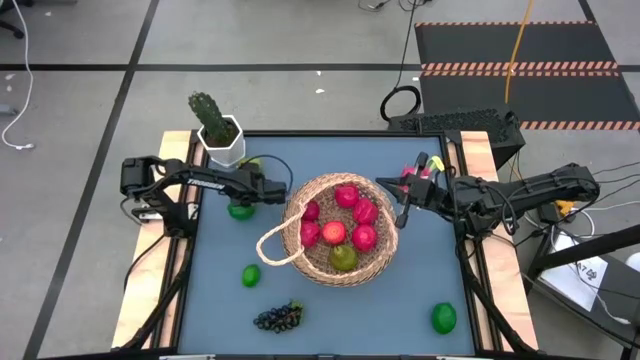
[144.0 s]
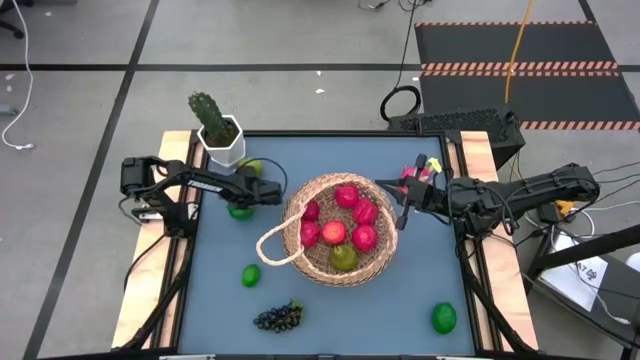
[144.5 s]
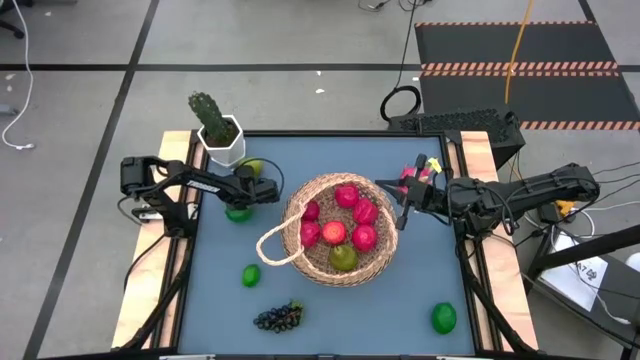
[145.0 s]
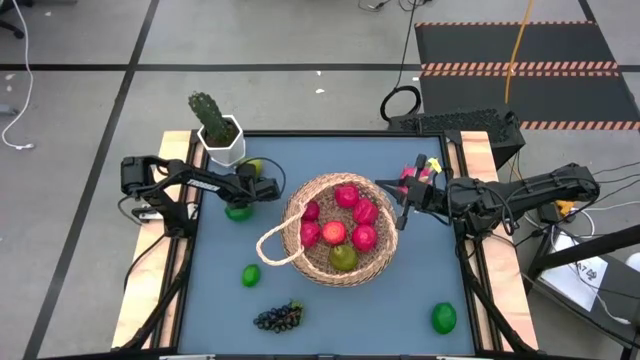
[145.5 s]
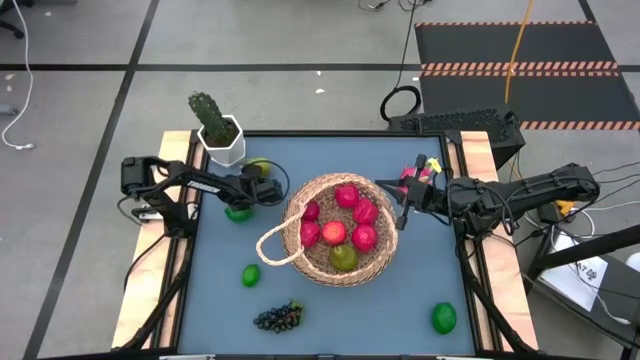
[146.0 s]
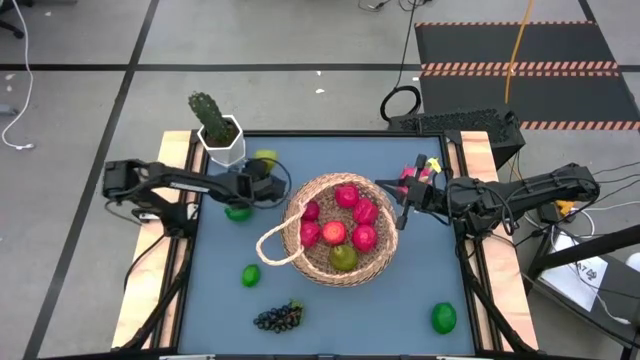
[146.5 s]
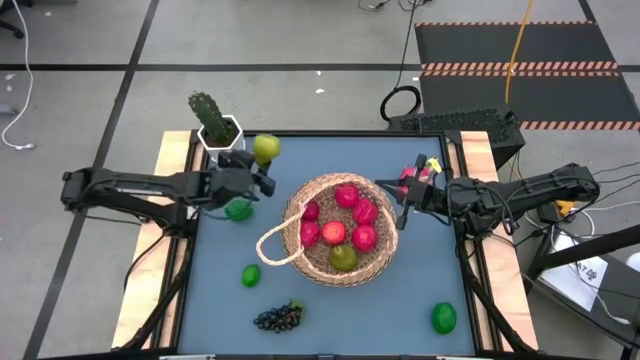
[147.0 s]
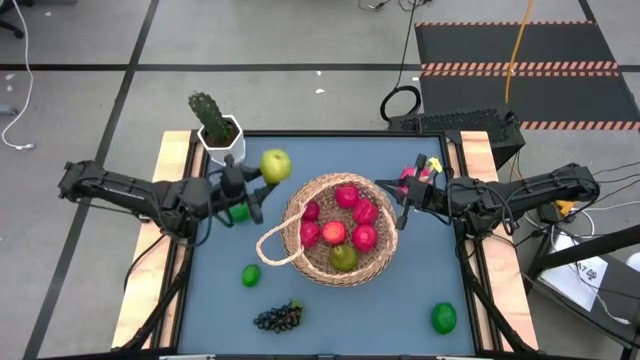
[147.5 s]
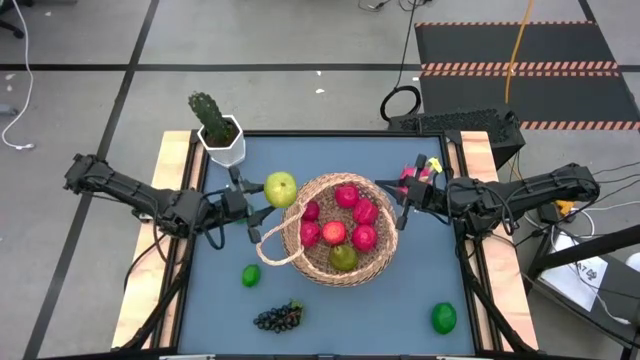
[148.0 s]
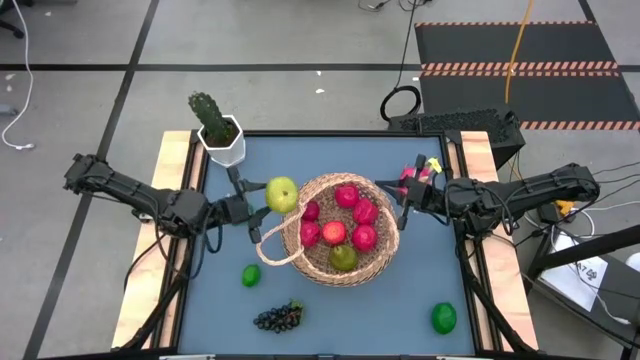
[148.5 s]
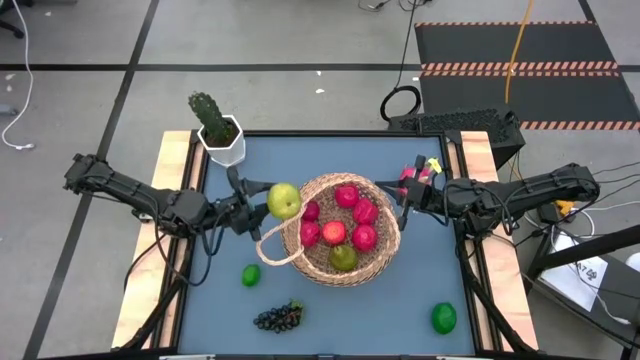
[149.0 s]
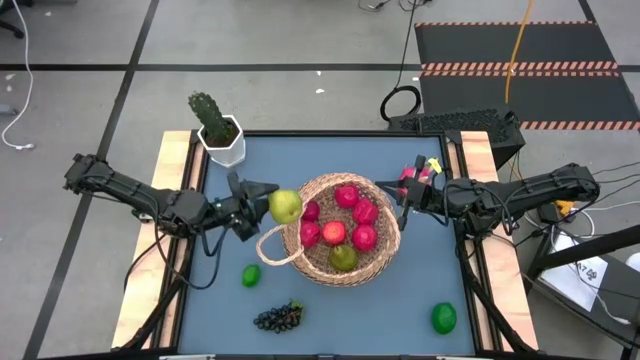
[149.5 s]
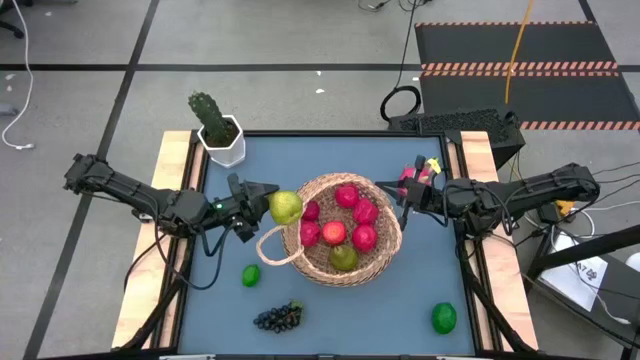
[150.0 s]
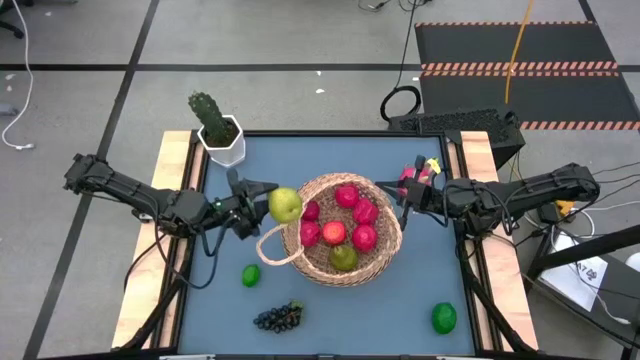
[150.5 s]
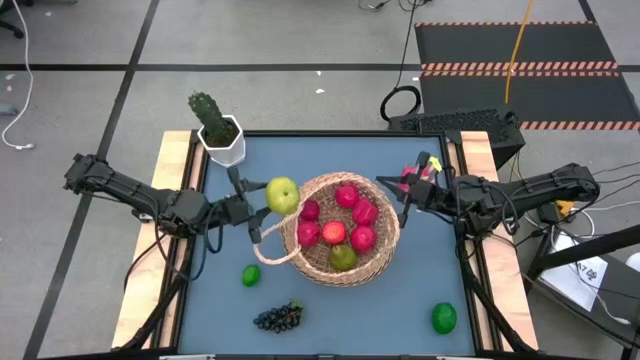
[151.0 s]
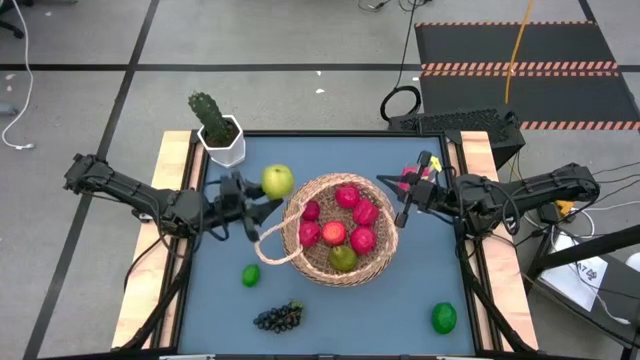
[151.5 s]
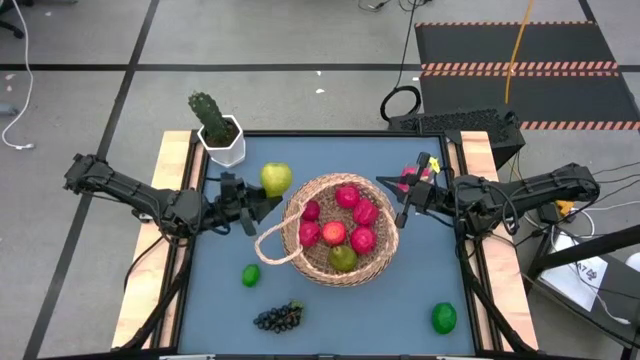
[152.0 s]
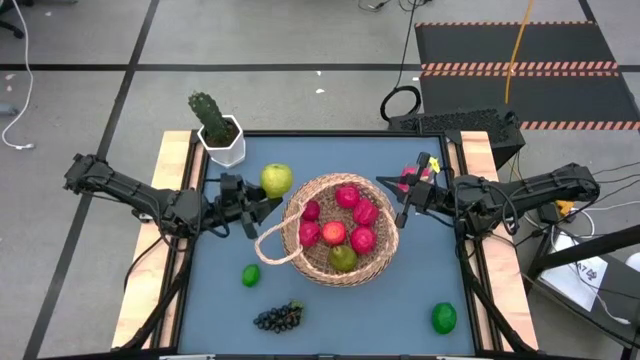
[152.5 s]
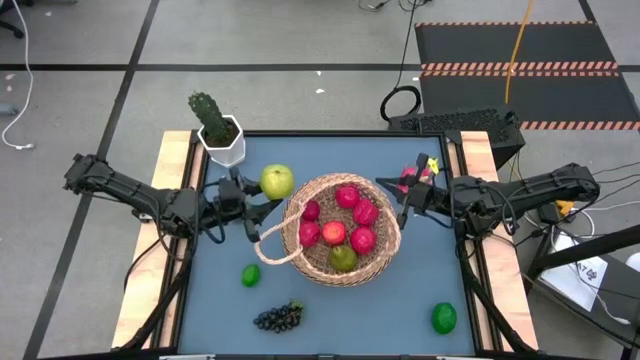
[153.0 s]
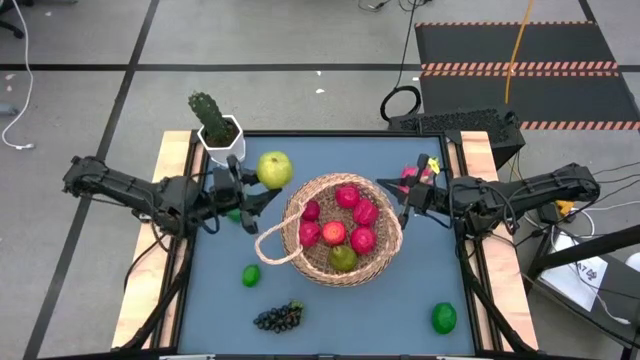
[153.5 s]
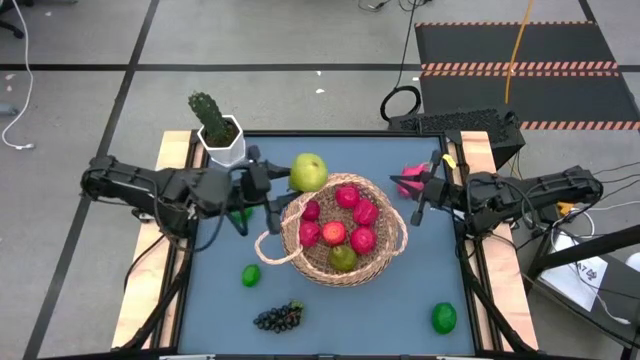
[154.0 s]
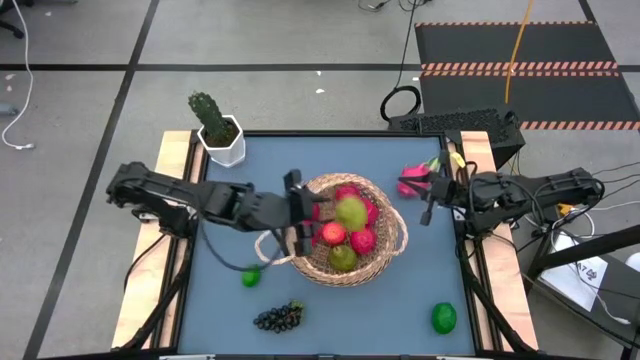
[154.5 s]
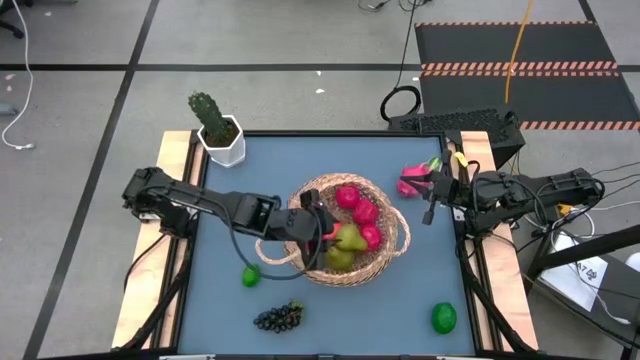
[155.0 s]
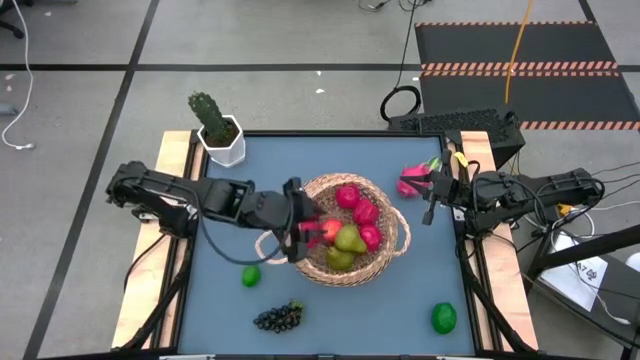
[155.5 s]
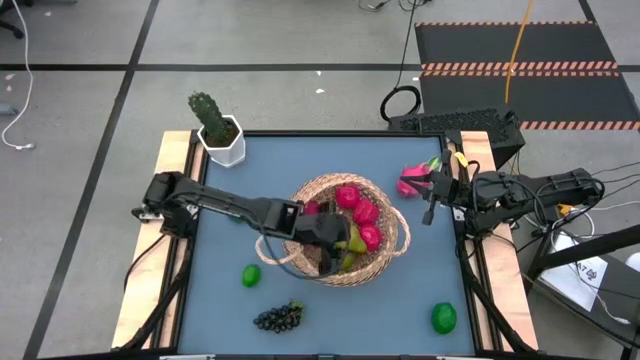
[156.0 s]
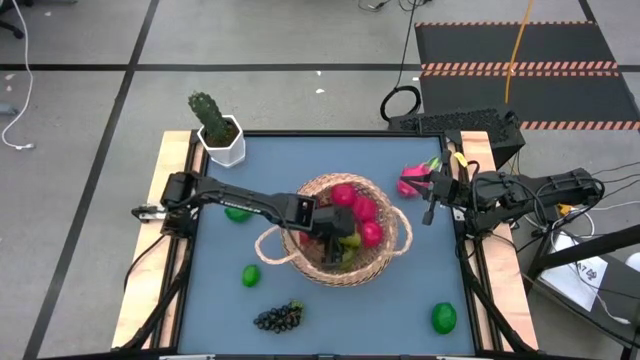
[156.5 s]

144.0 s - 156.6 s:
Task: Build produce basket
Put the light green pear into the brown basket

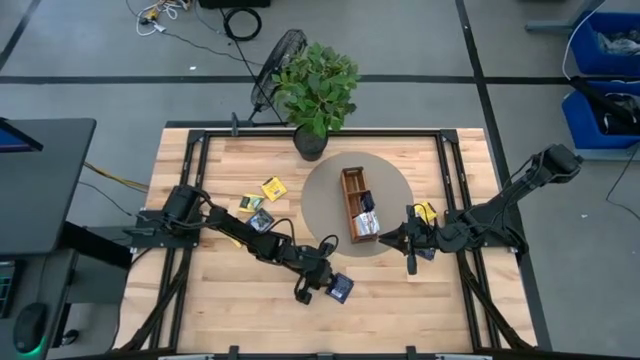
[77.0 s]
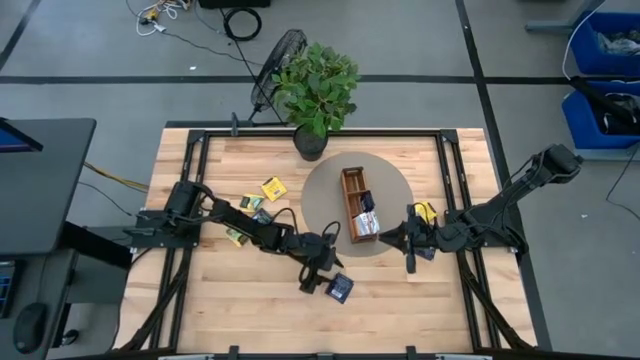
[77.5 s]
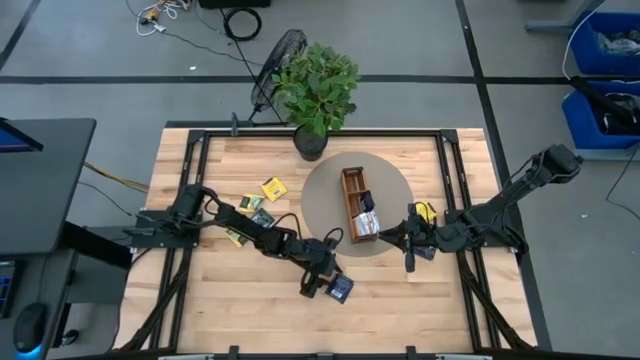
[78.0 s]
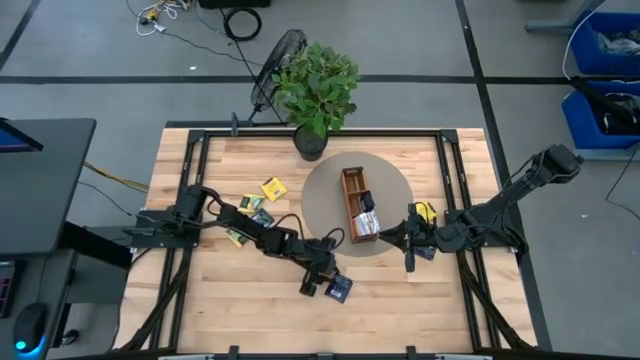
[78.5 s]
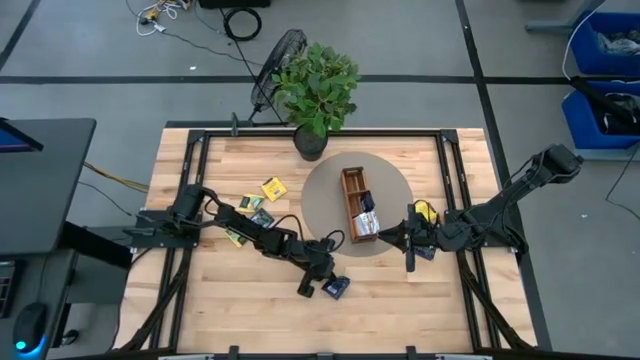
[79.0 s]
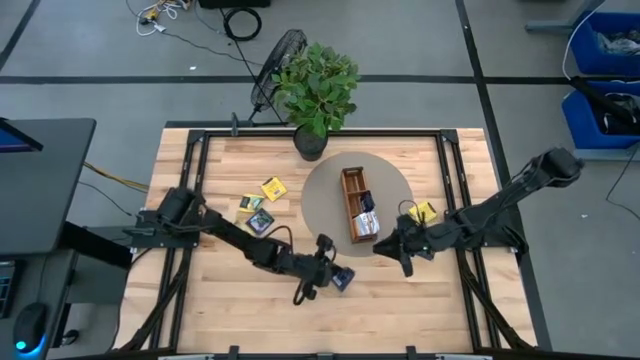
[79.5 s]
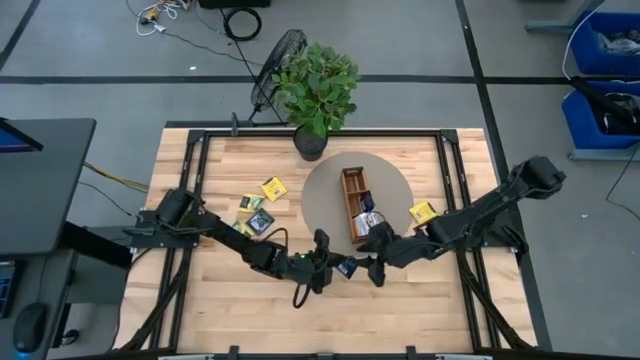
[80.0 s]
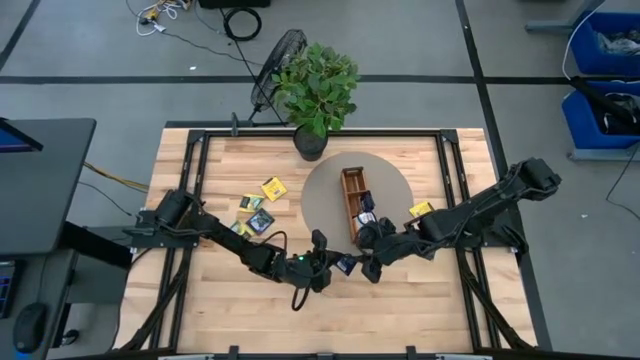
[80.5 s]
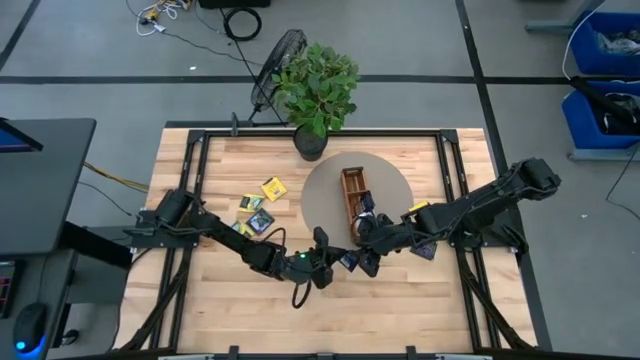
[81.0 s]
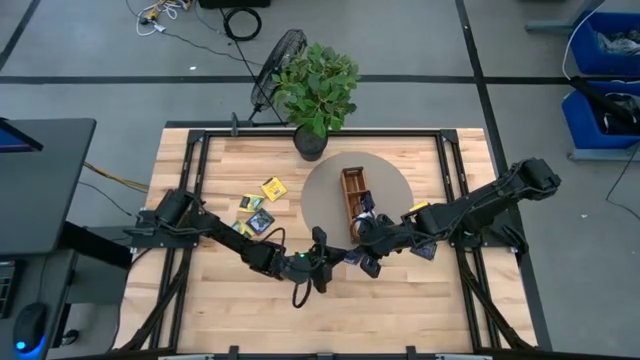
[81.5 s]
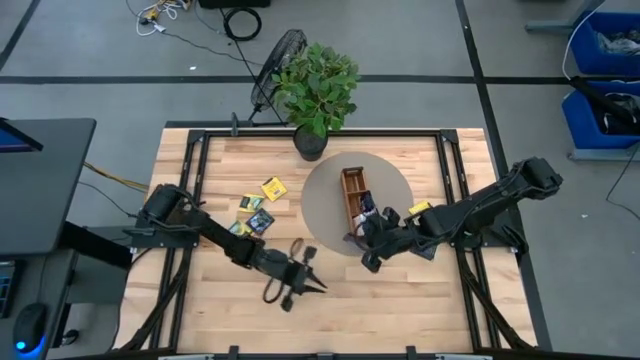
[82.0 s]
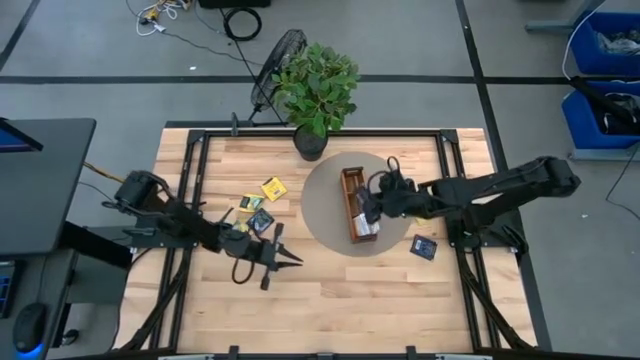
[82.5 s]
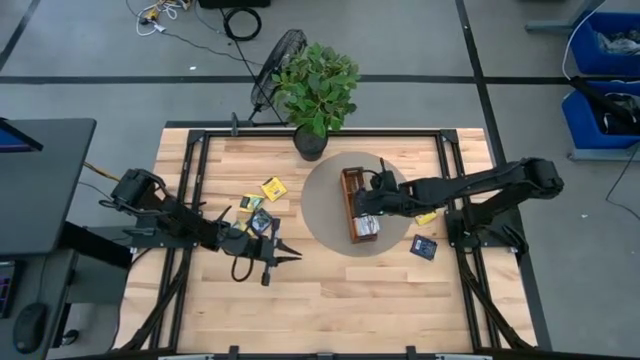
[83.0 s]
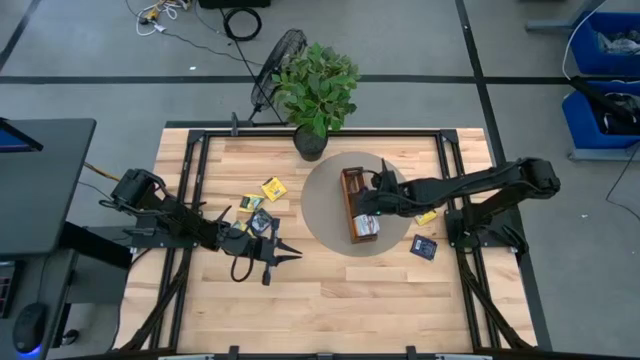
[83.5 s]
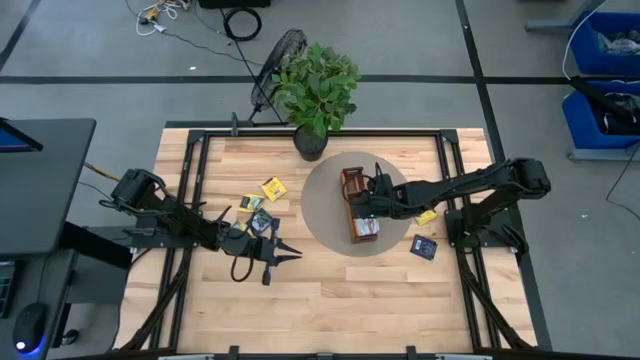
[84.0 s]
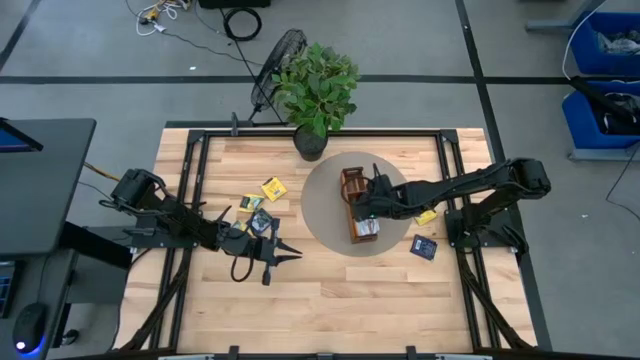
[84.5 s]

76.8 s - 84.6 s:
Task: Pick & Place Tea
Put the purple tea bag into the middle section of the wooden organizer
